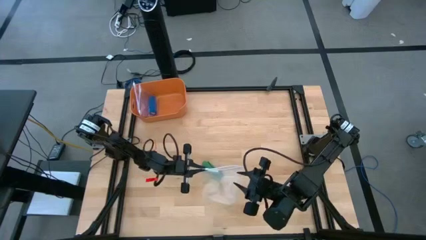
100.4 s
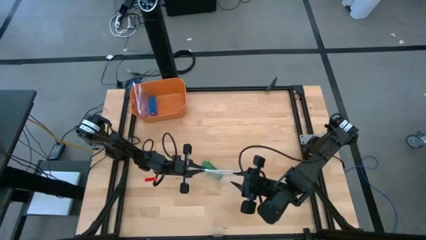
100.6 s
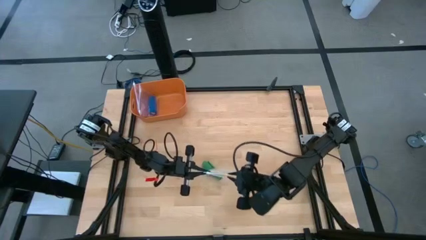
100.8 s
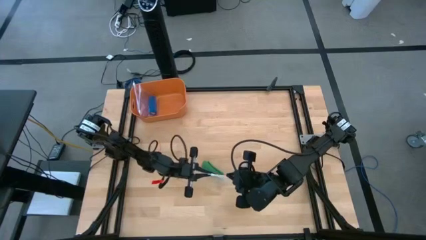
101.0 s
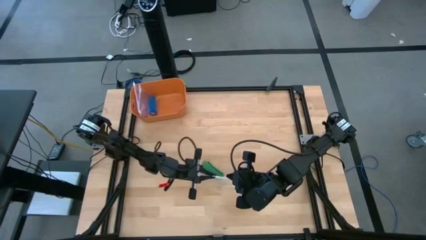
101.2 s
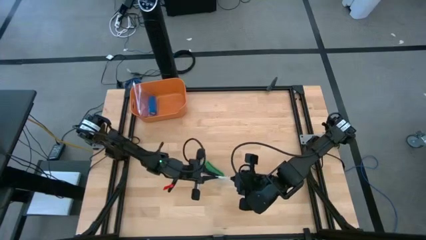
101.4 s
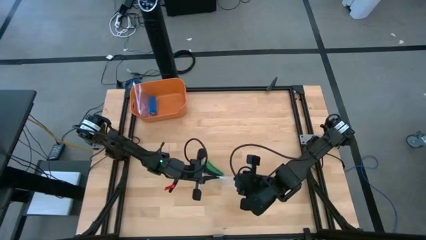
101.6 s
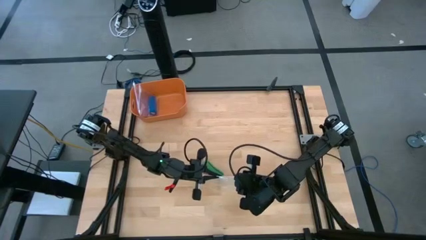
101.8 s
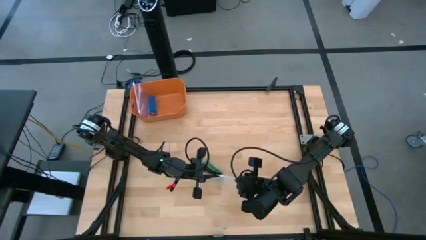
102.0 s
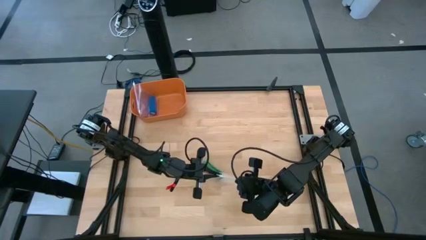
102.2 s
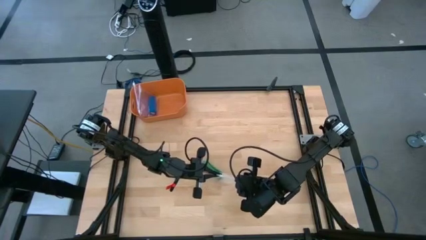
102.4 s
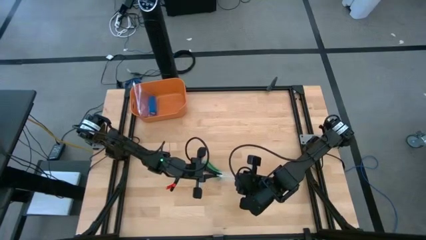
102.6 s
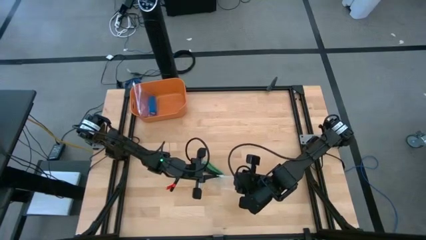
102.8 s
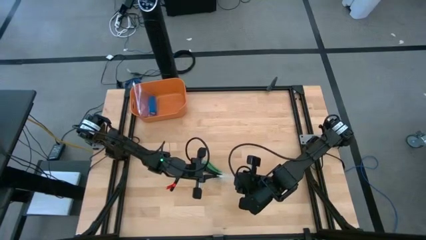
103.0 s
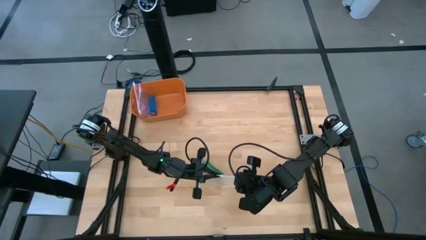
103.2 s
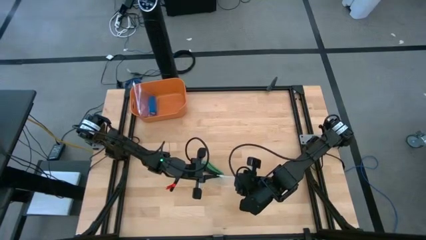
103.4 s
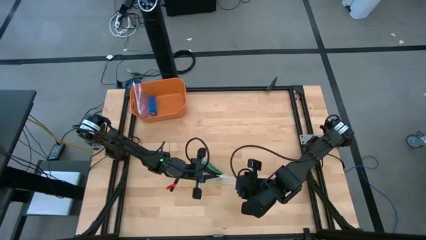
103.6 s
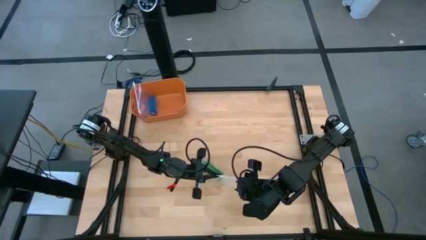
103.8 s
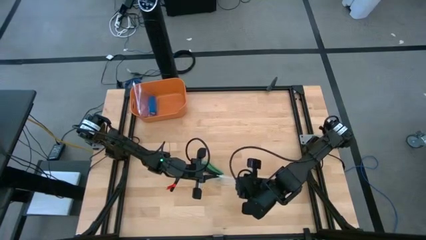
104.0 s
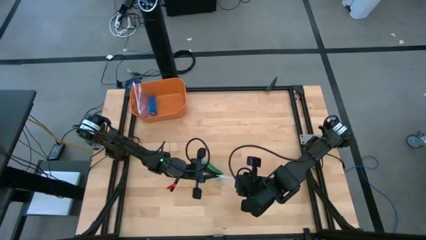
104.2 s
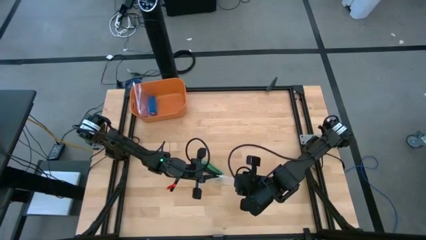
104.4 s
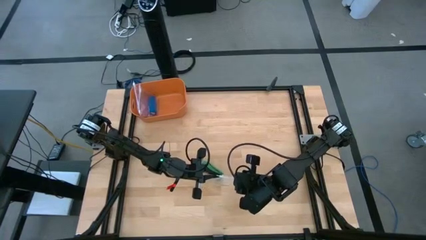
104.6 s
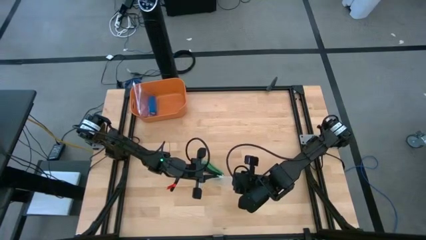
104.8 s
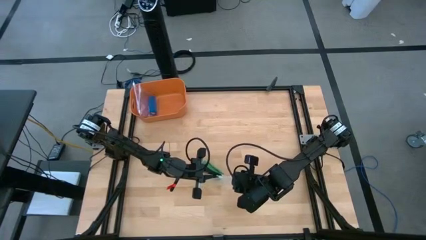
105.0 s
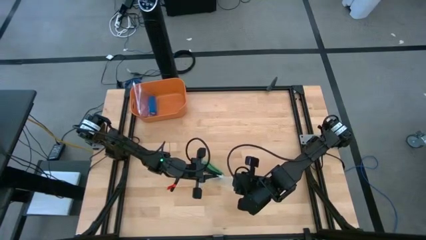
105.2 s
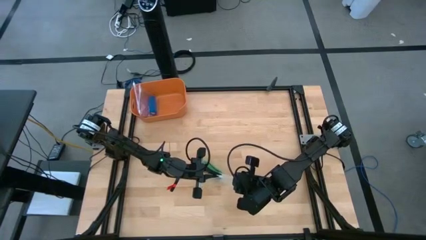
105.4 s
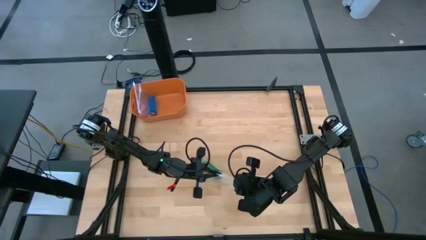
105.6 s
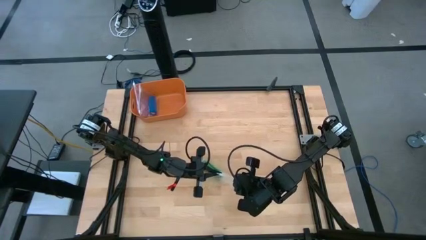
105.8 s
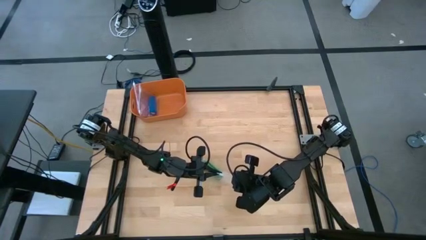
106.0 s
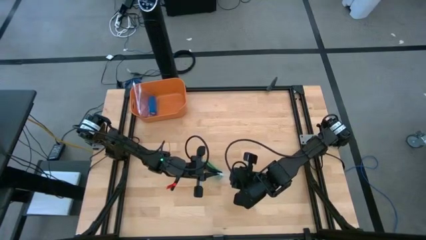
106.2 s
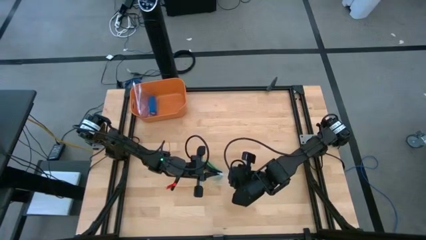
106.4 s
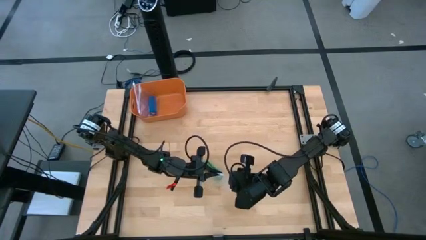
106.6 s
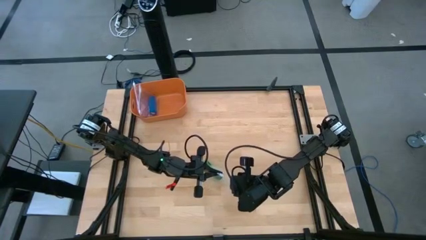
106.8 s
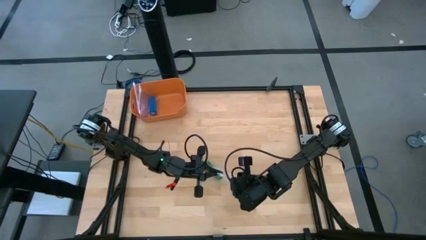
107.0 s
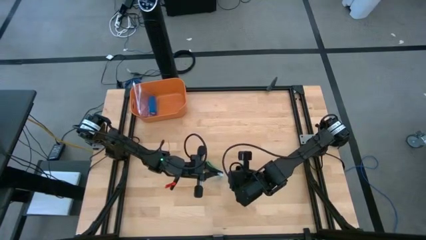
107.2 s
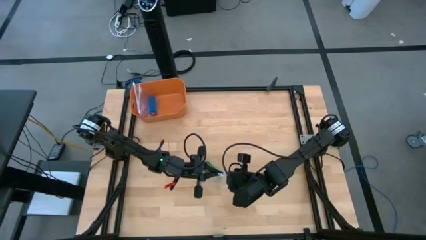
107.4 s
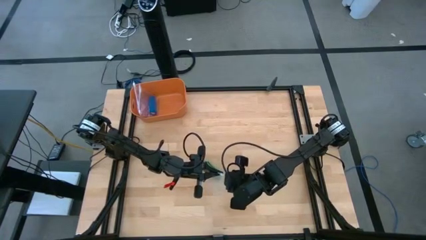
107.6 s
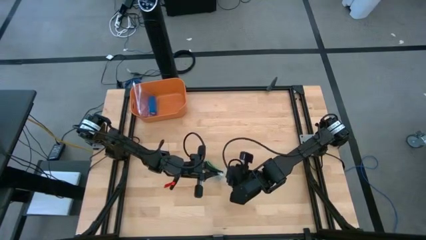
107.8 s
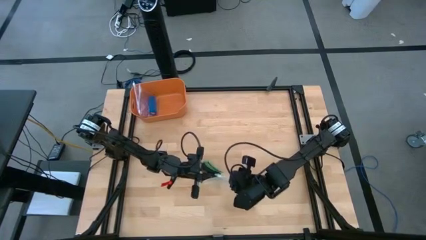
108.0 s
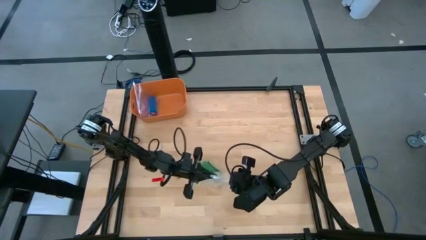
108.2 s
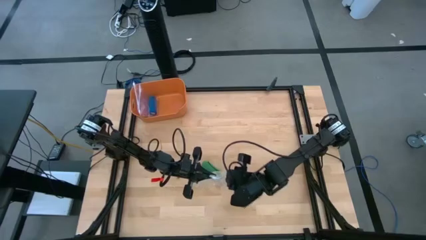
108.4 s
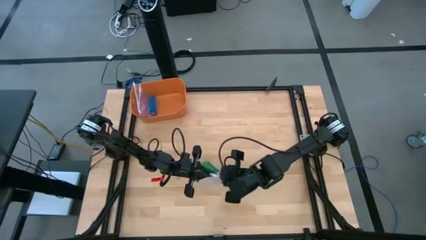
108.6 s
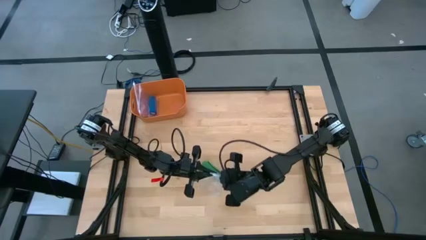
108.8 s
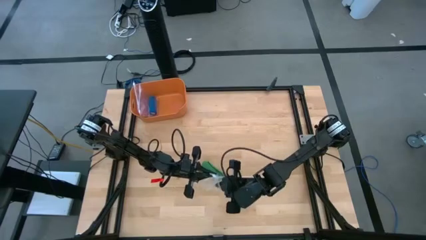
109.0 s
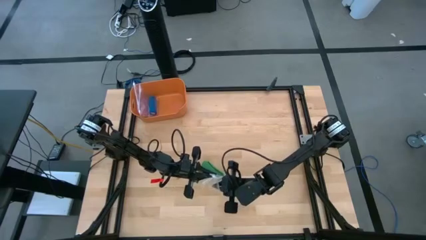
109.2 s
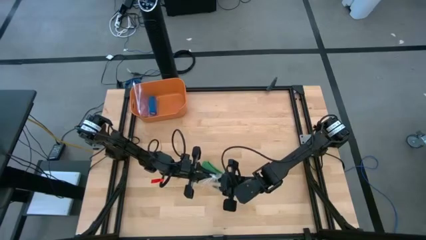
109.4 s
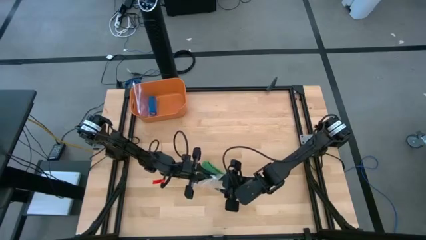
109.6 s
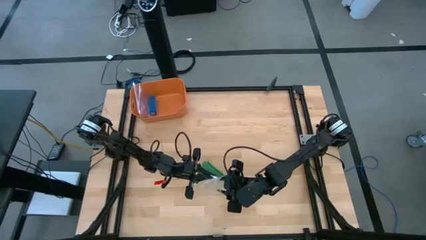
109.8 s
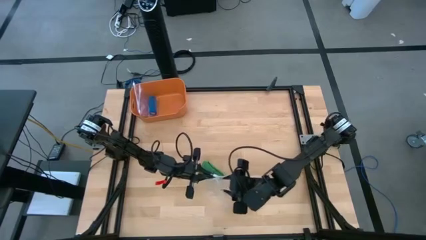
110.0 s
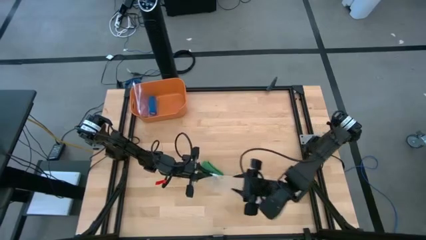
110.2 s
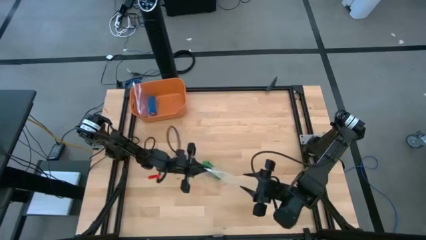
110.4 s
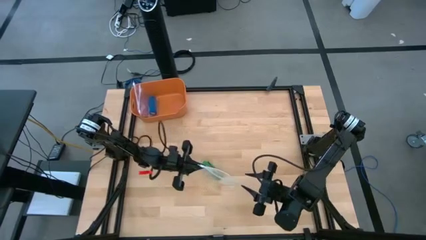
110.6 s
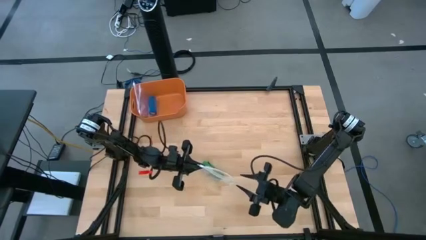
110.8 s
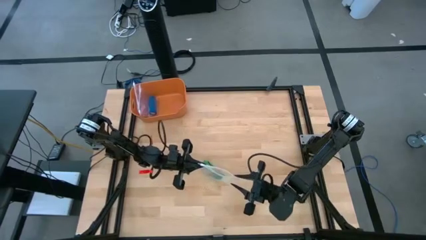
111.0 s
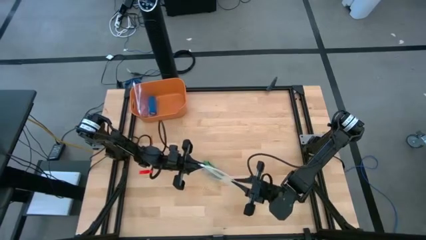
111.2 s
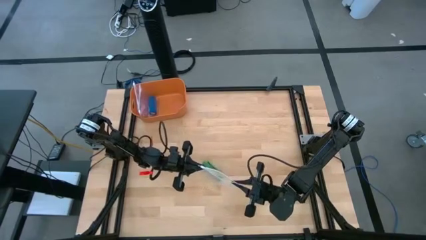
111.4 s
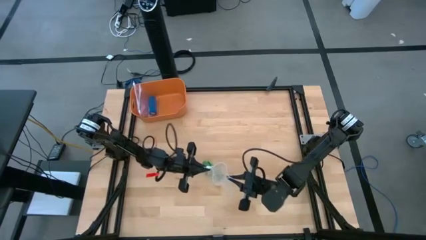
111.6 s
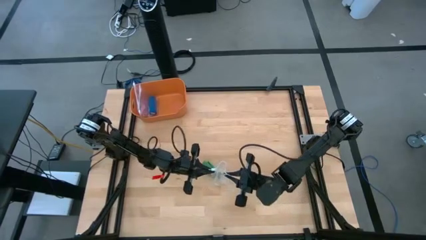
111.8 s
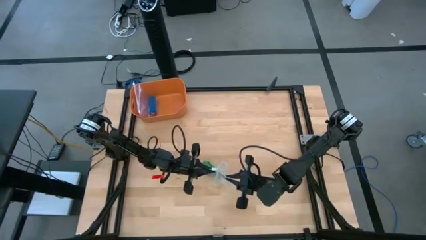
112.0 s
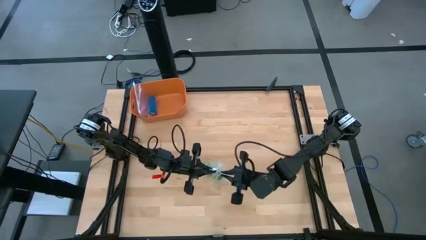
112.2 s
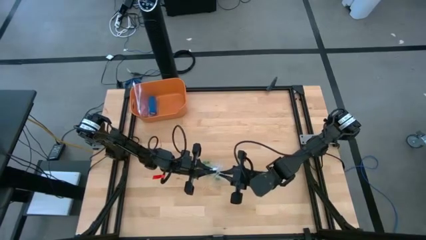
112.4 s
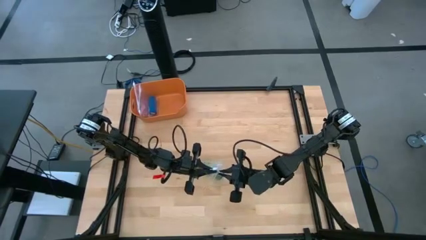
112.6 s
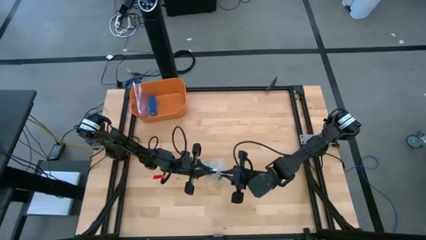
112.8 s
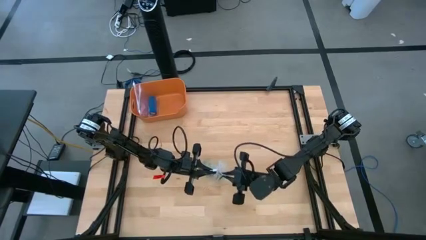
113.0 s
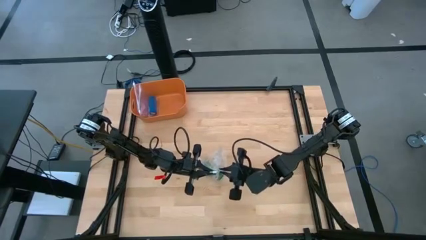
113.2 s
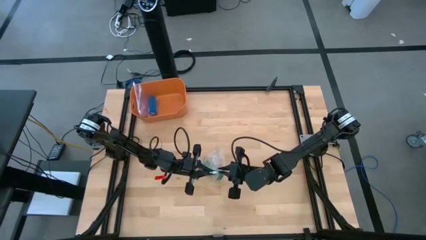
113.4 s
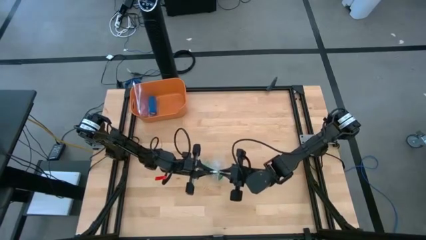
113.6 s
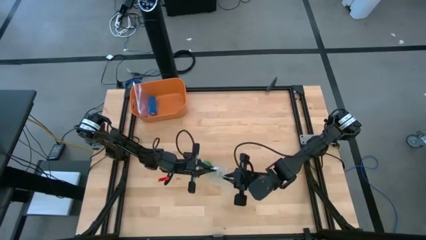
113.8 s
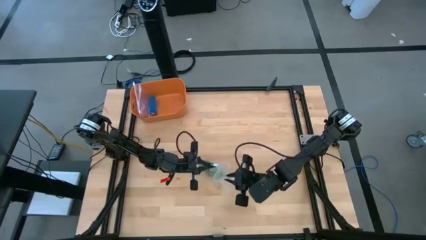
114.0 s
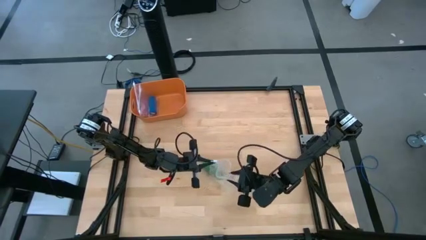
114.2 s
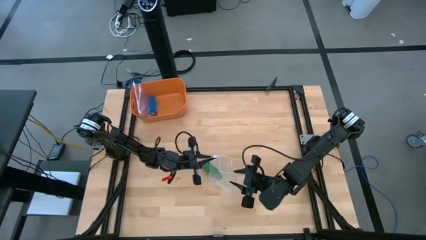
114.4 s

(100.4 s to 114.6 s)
Task: Roll bandage
Open the transparent zip bag

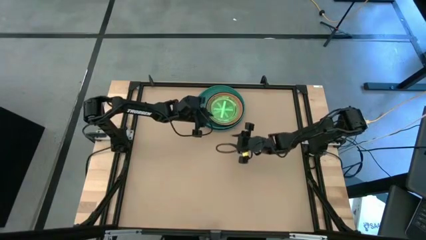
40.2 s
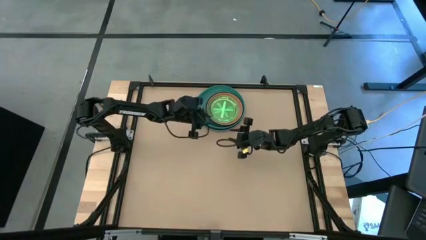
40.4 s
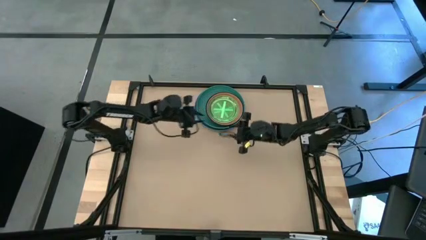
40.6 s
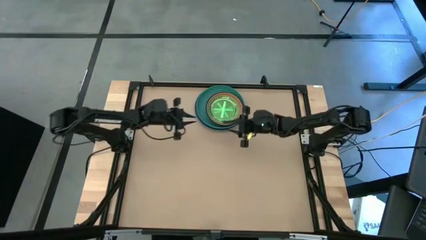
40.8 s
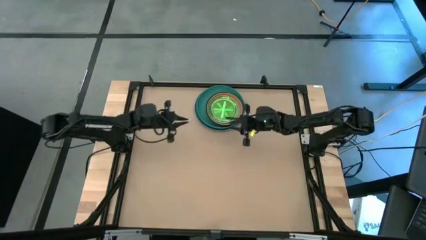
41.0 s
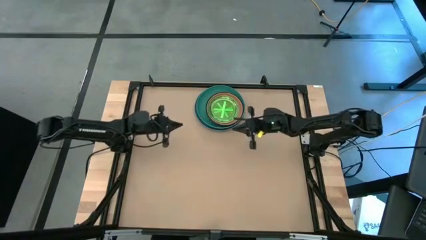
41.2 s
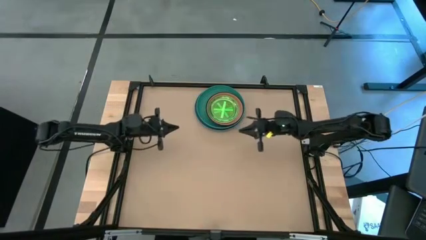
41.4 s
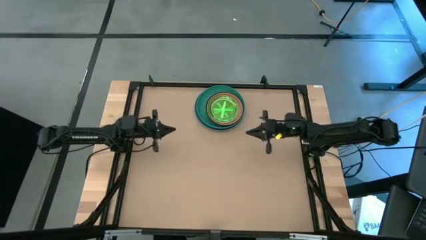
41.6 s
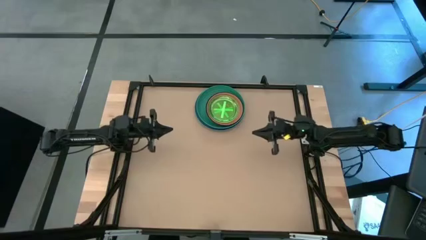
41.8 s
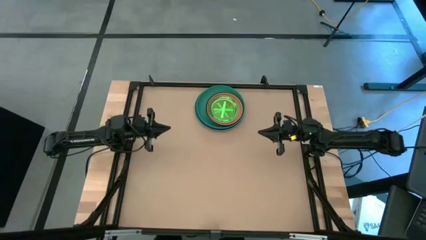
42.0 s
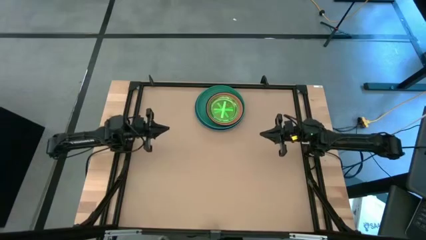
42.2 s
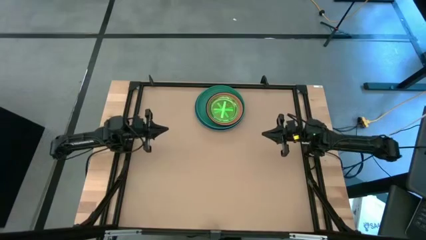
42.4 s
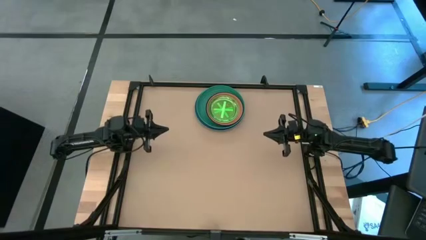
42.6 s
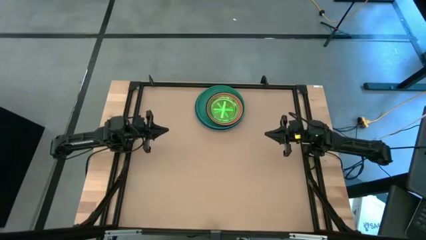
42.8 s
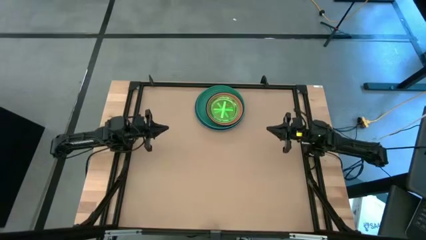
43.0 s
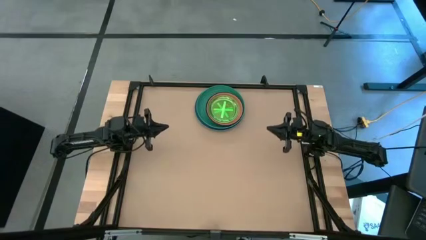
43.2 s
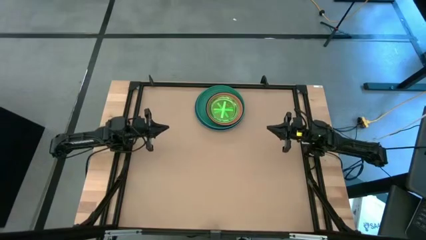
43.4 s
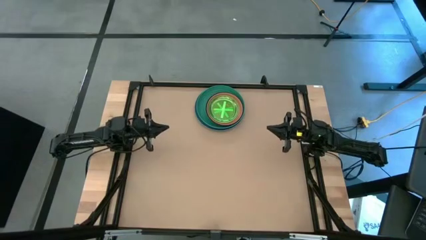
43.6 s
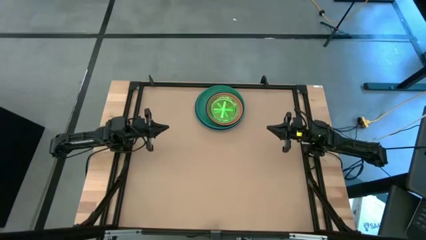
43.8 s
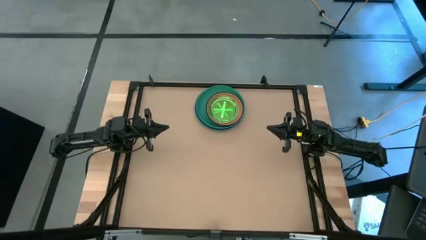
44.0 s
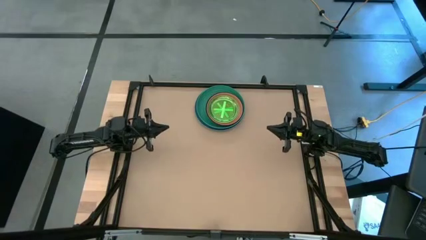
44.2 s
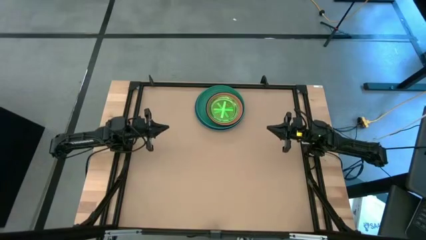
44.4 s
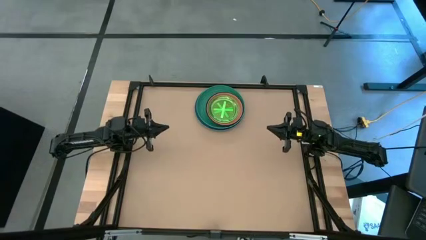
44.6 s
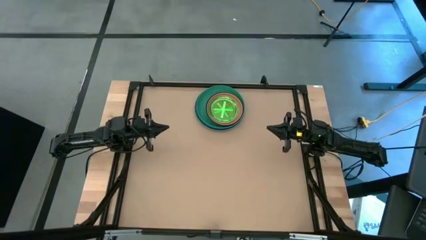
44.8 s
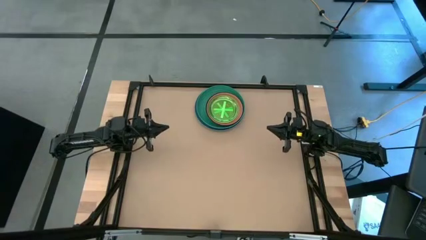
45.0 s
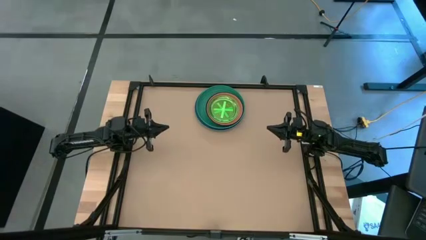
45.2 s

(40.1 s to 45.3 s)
Task: Stack plastic plates
Return to Home Position
